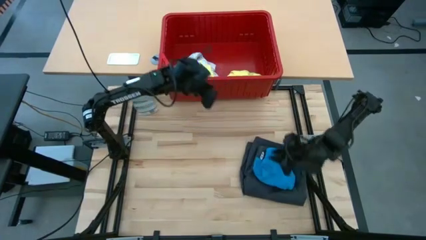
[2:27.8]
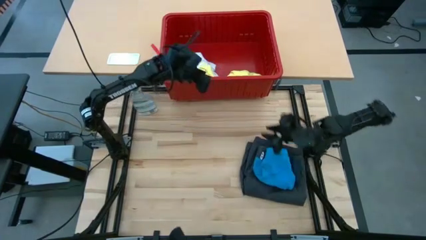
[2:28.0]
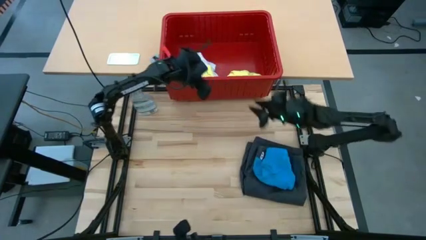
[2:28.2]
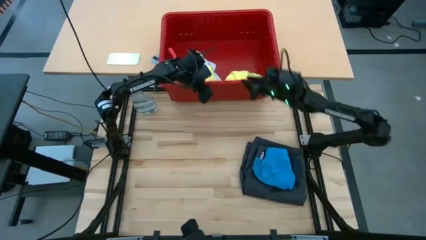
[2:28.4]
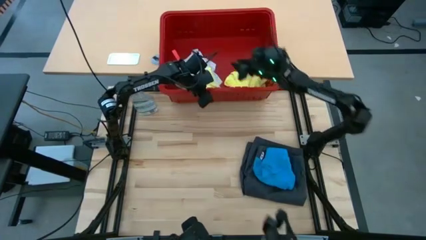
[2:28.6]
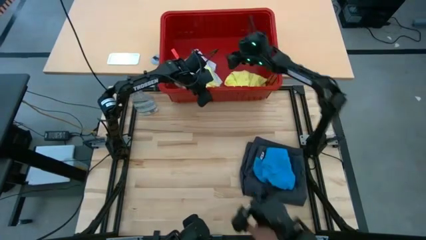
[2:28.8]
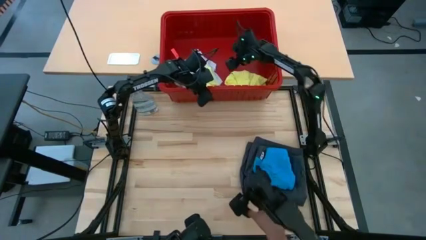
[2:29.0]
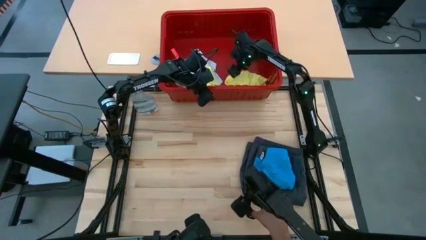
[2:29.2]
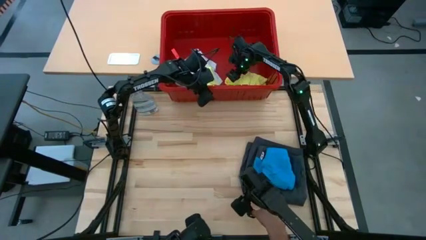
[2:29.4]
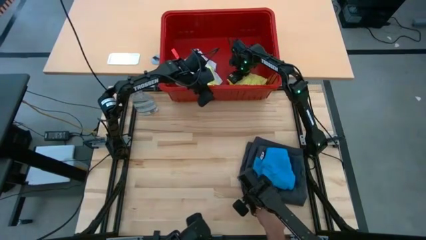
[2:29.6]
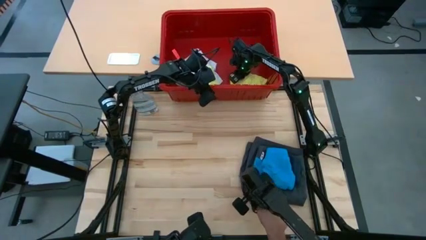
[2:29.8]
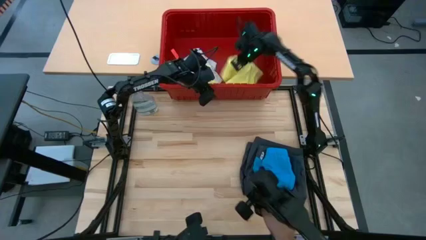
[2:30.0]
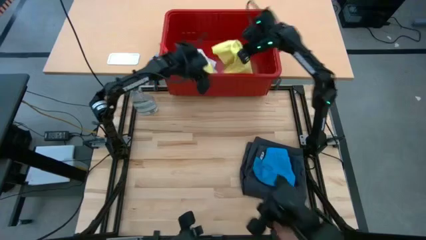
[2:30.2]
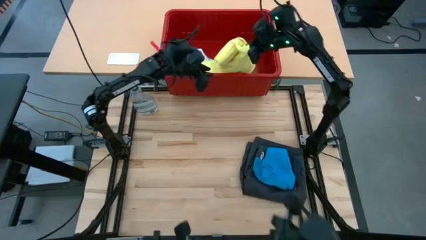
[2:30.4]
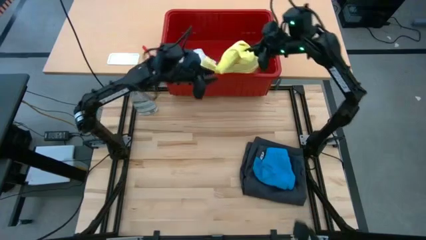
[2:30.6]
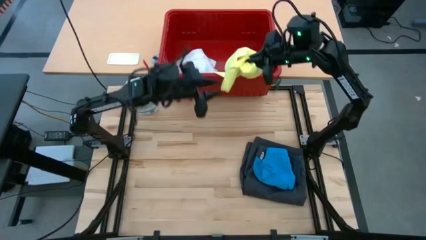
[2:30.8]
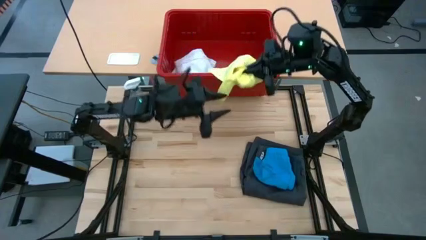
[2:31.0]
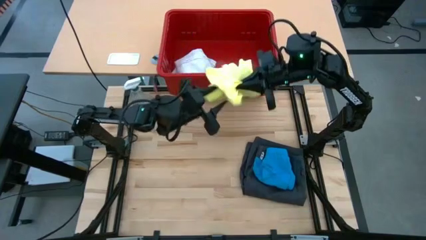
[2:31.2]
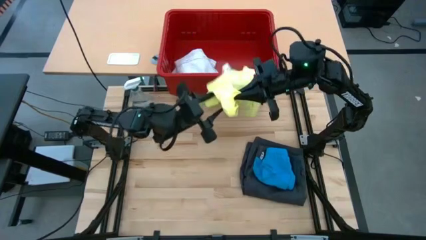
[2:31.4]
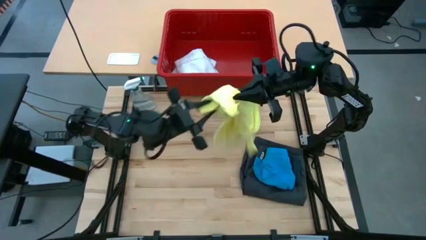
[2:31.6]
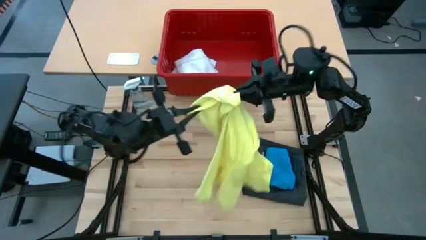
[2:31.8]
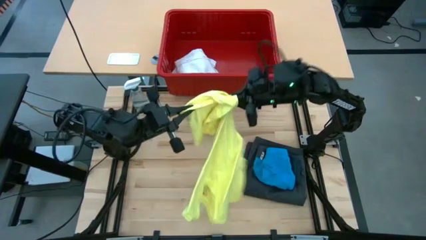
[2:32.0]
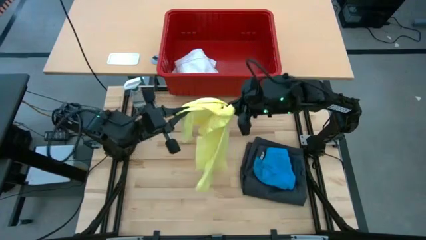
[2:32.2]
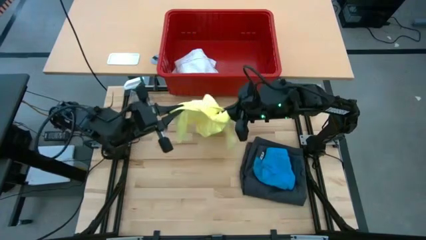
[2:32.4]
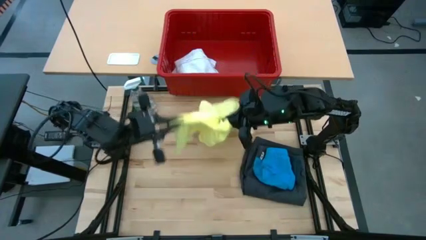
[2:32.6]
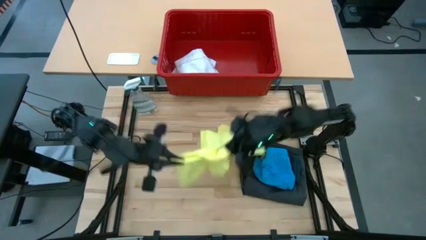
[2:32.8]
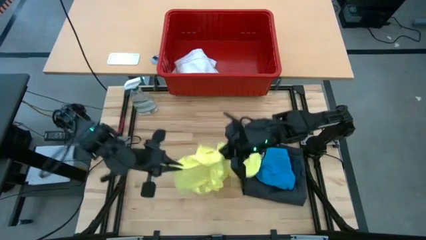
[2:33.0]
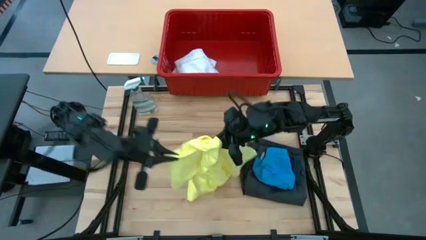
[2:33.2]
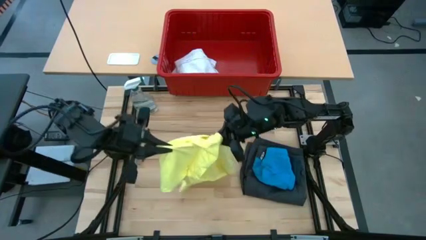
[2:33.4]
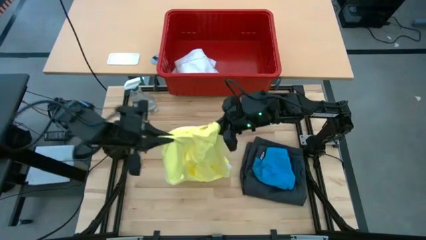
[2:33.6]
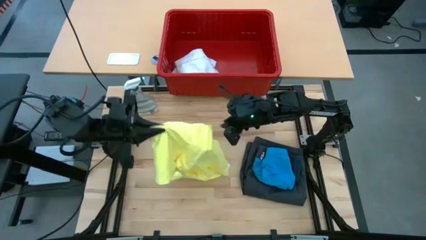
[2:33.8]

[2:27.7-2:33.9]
Task: Fold laundry
Remove the yellow shirt from the red laundry bin

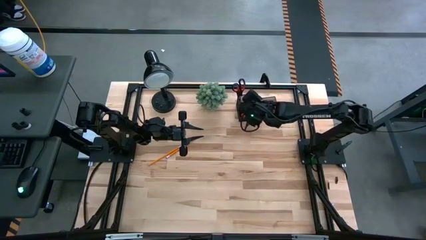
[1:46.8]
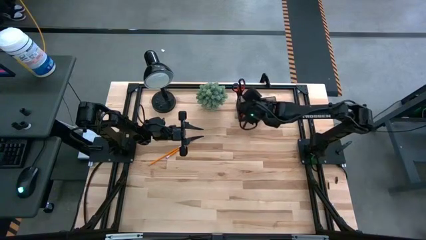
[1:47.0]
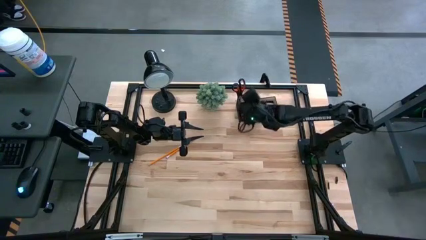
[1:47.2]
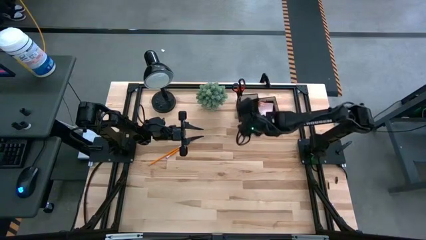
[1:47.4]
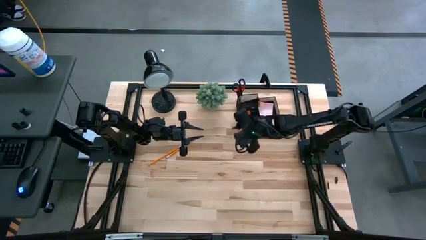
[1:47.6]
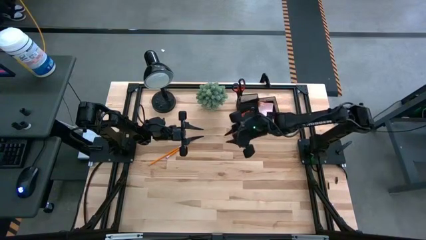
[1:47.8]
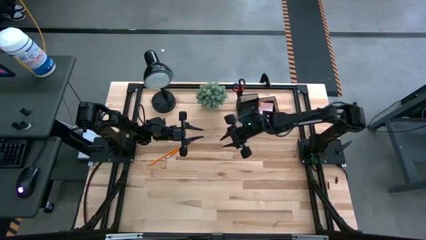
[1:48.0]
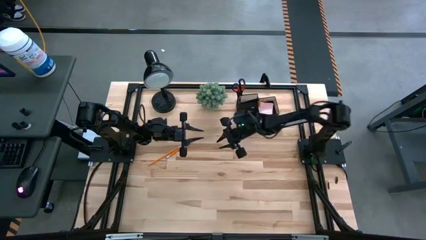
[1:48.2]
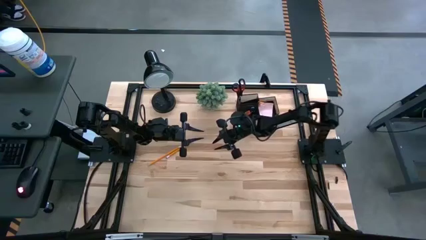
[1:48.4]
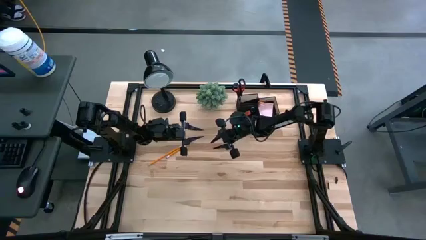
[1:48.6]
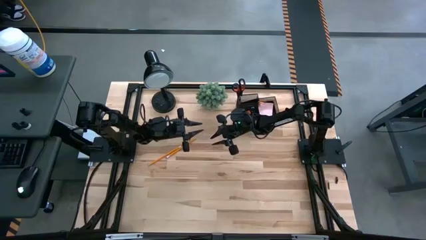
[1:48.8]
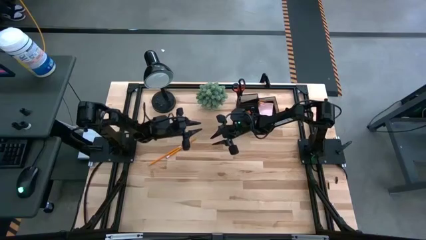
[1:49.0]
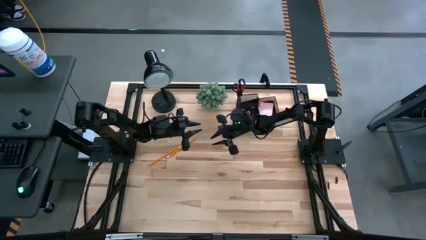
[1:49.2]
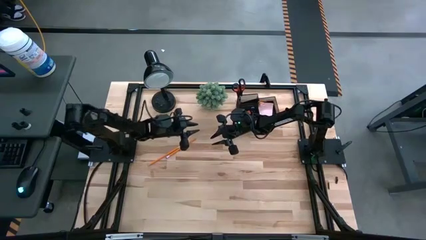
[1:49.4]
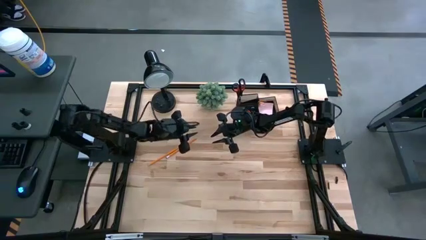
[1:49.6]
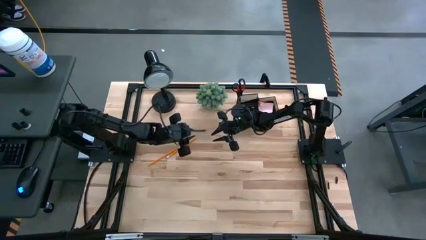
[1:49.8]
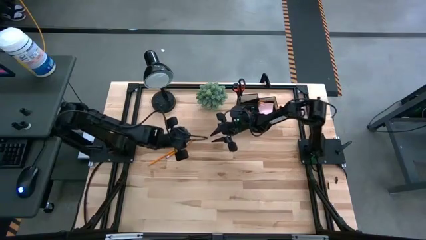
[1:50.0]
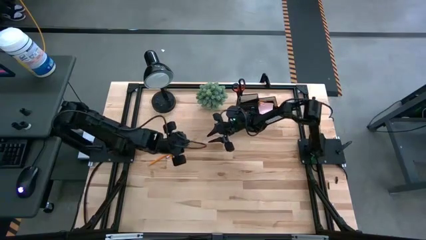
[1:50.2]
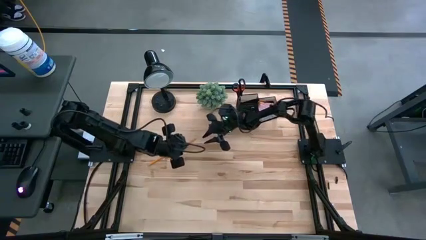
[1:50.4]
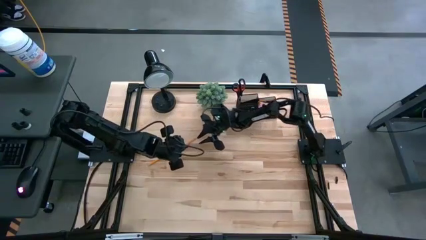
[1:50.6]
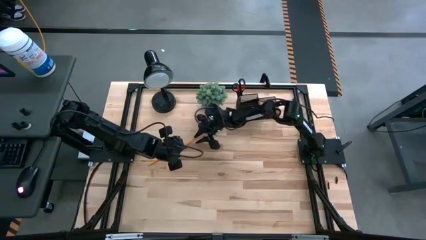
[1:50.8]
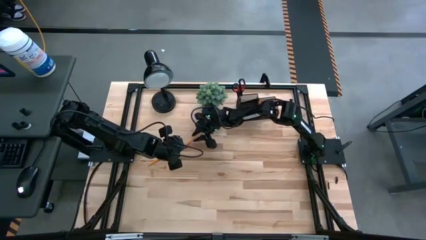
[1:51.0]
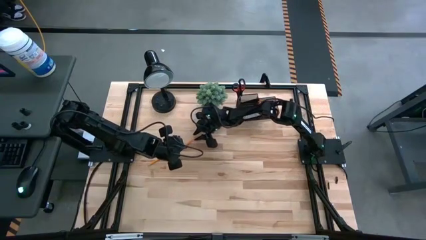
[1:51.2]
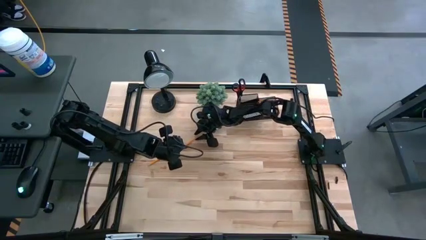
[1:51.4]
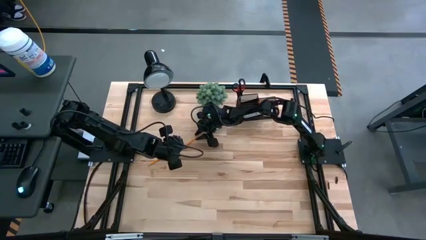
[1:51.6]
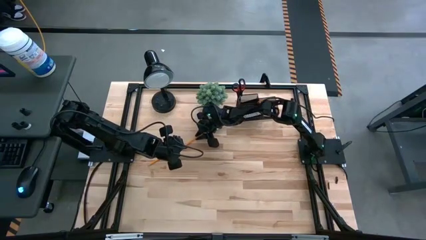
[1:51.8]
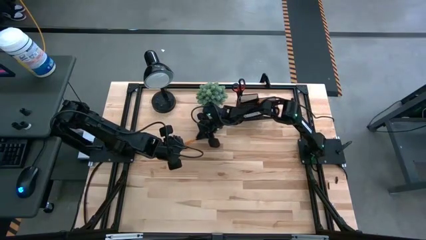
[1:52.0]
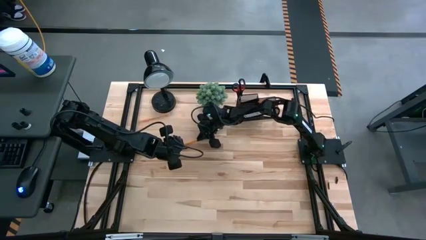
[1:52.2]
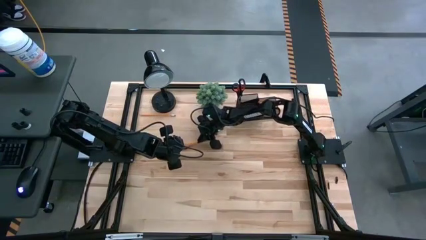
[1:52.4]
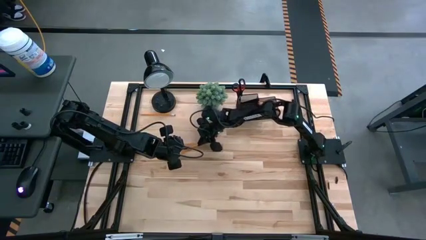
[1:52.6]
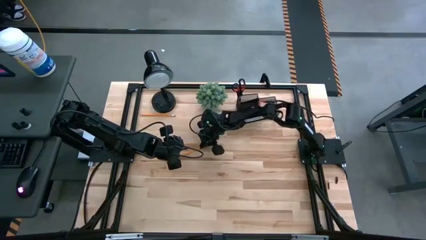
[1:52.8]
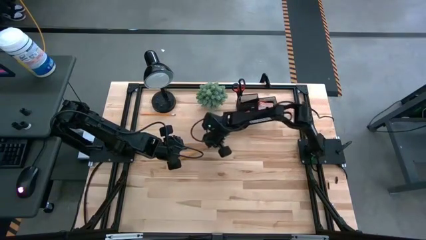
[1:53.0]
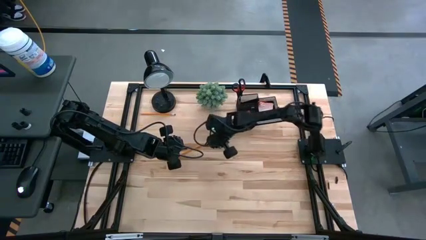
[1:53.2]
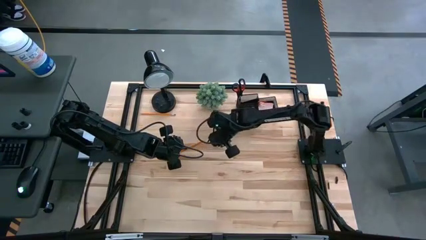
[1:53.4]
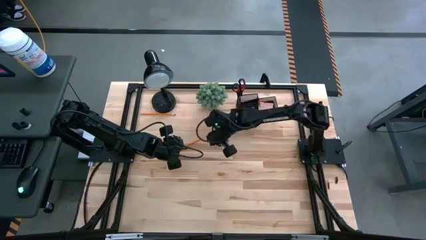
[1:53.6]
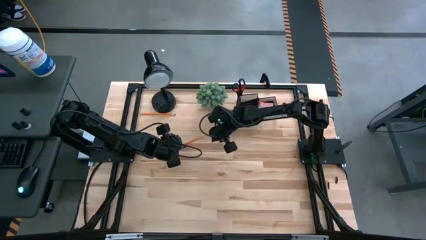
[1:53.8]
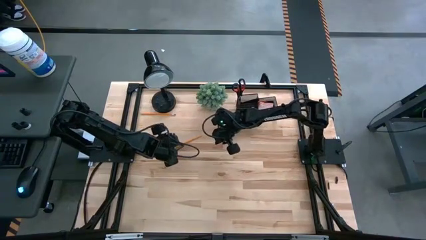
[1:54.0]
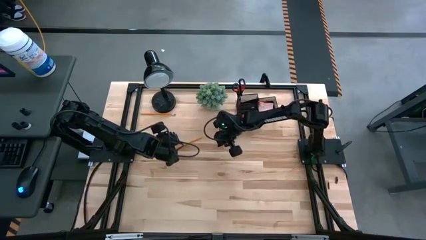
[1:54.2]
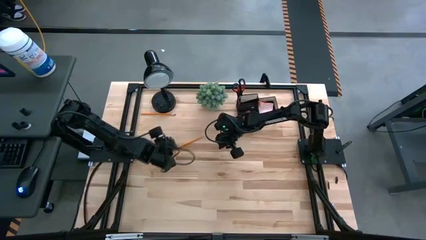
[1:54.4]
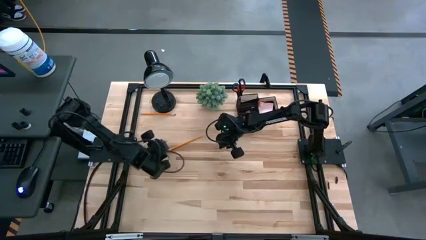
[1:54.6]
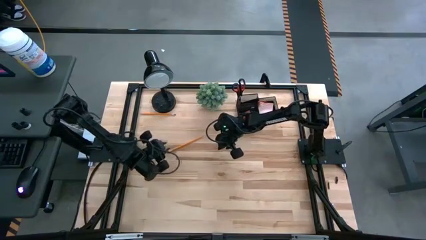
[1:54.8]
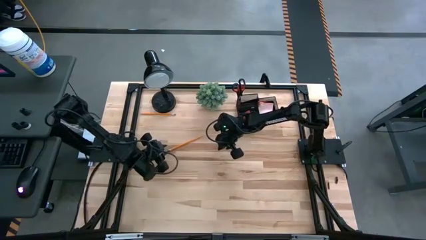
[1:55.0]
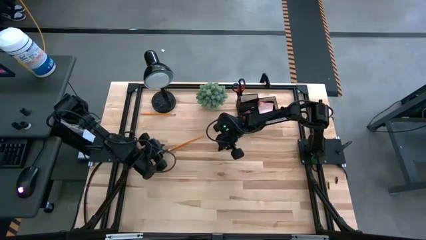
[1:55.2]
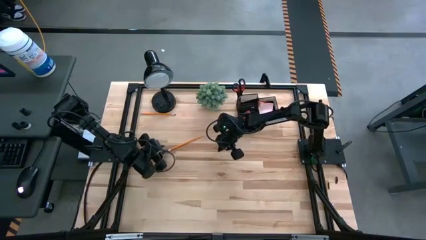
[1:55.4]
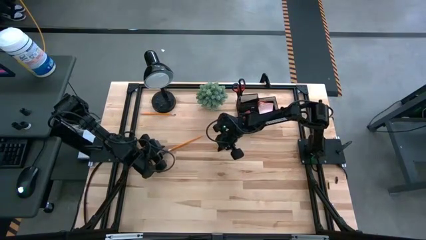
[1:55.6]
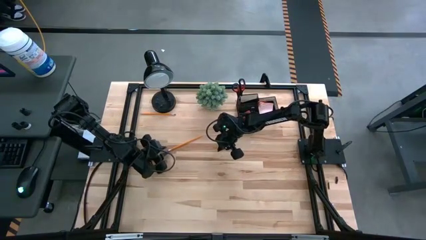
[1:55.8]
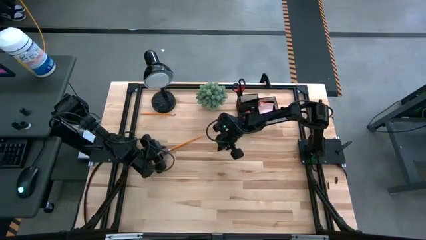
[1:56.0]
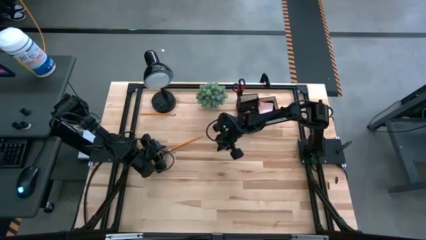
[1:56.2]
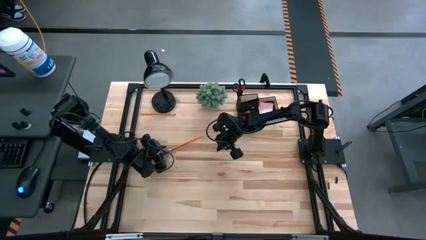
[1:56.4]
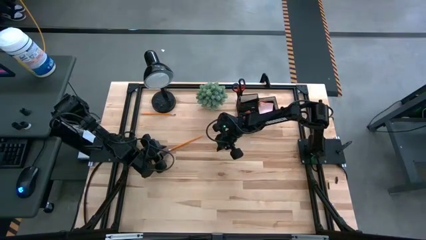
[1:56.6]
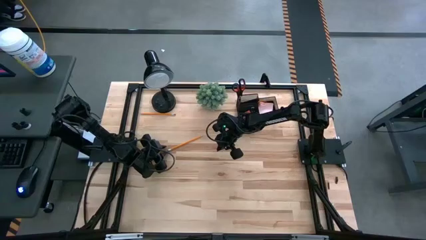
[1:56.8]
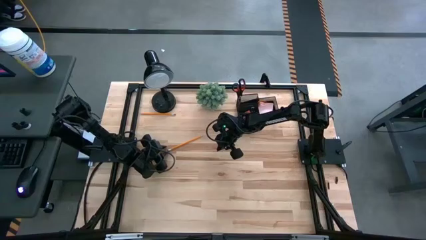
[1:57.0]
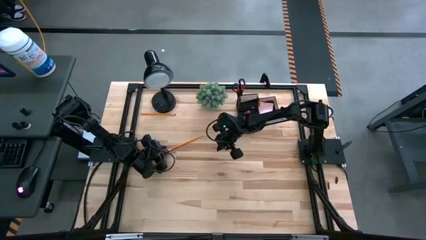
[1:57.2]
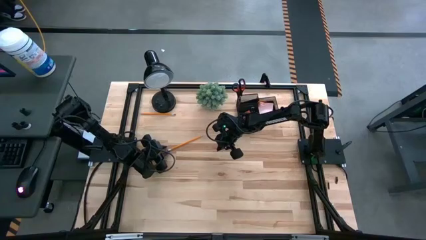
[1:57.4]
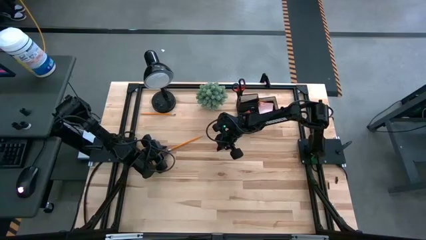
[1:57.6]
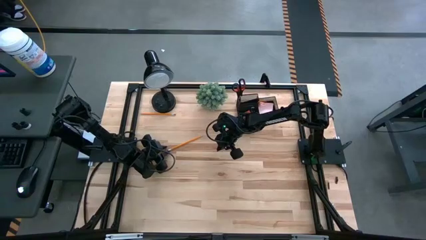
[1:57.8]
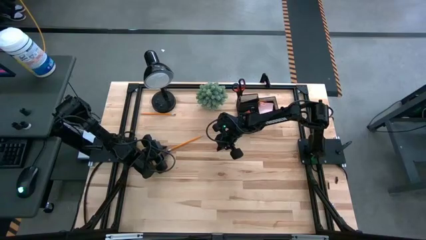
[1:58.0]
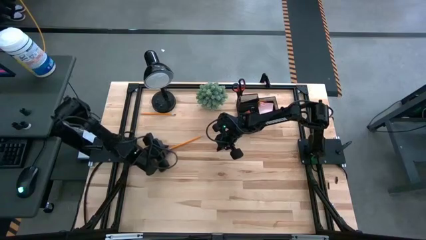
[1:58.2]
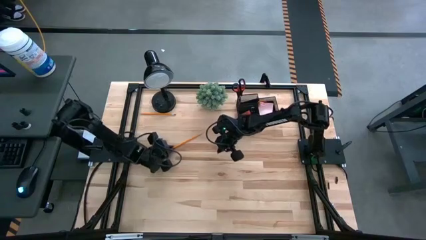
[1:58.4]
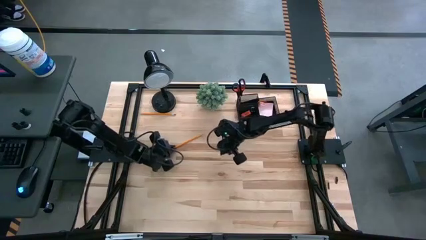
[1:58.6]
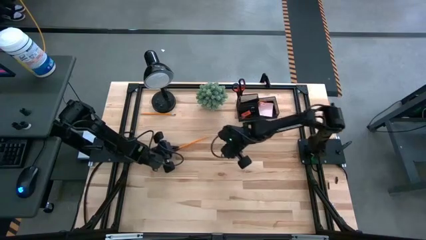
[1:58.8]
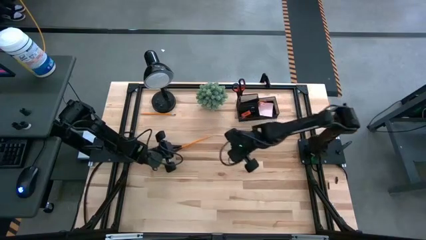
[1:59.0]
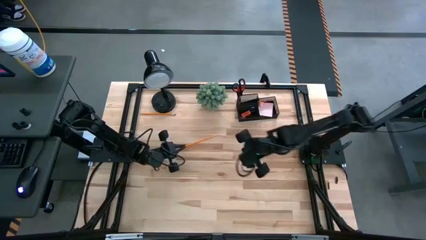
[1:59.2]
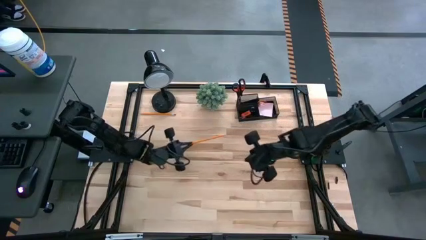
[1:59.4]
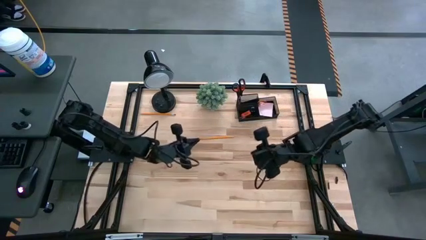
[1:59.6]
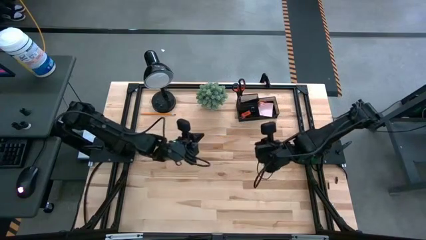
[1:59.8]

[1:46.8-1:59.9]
Task: Pick and place office supplies into organizer
Put the bottom orange pencil into the black desk organizer
